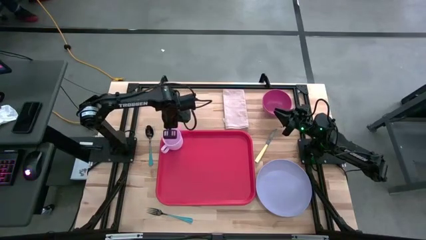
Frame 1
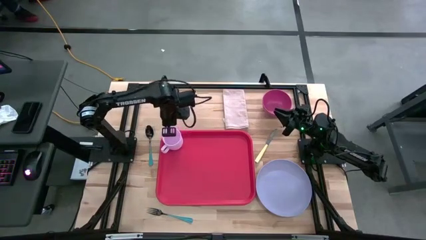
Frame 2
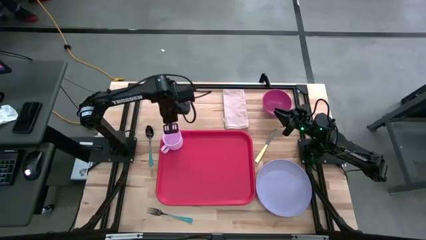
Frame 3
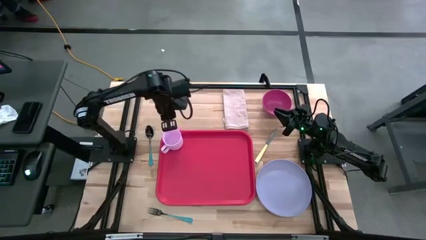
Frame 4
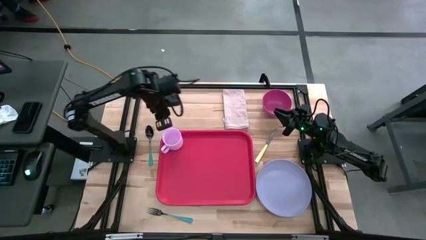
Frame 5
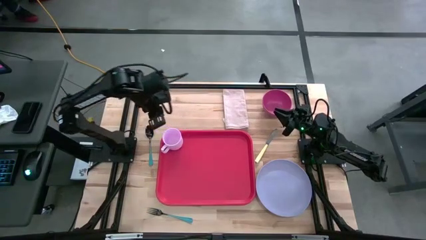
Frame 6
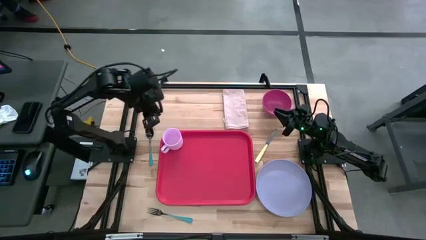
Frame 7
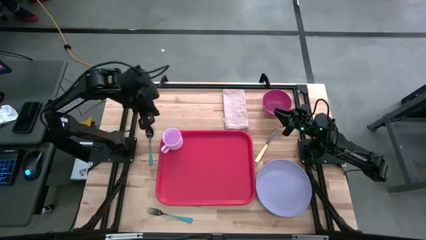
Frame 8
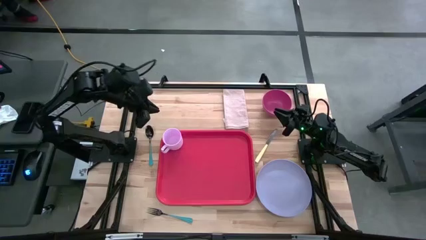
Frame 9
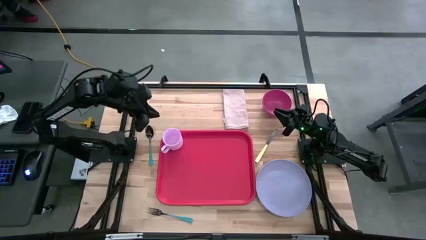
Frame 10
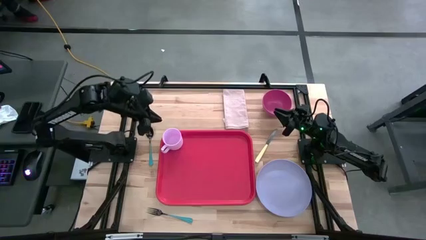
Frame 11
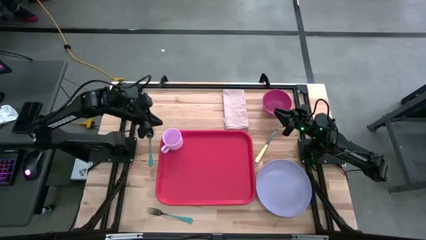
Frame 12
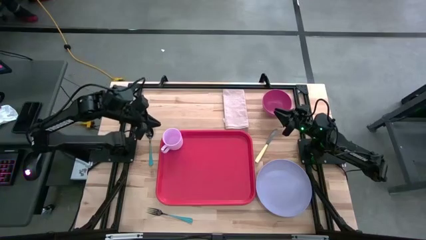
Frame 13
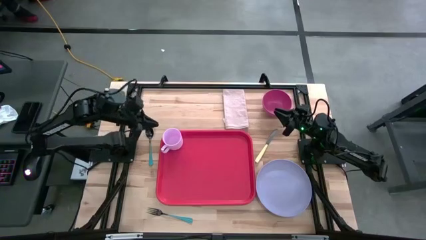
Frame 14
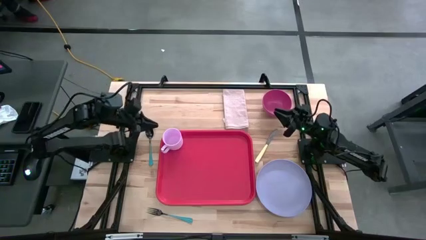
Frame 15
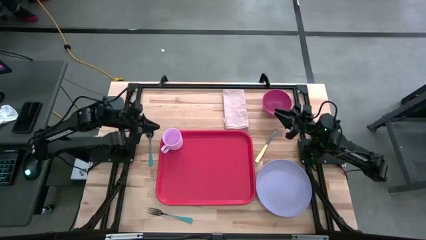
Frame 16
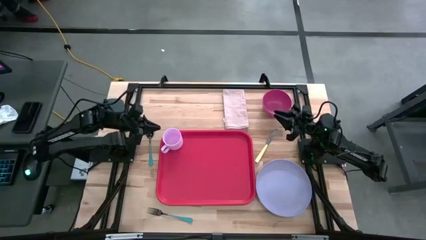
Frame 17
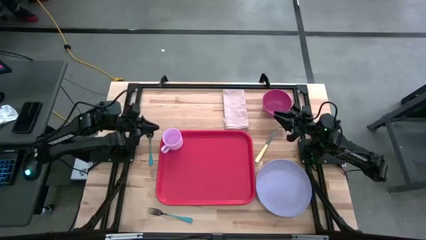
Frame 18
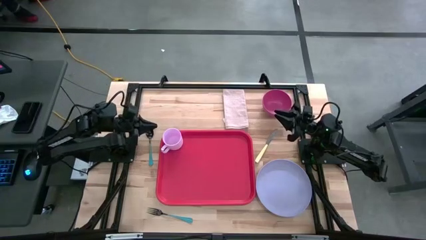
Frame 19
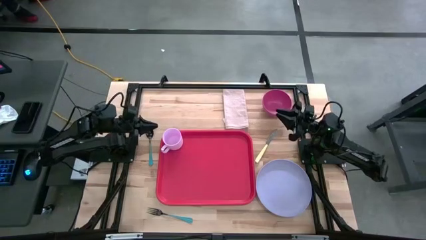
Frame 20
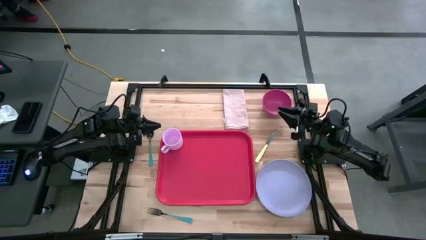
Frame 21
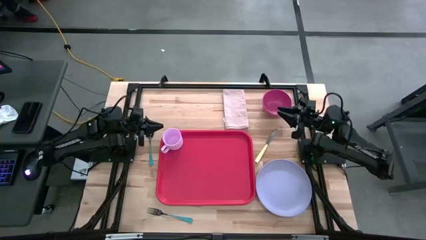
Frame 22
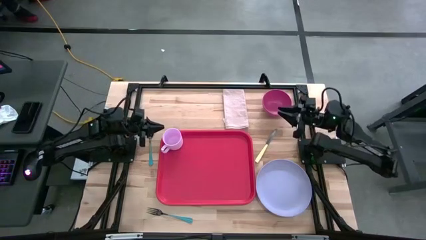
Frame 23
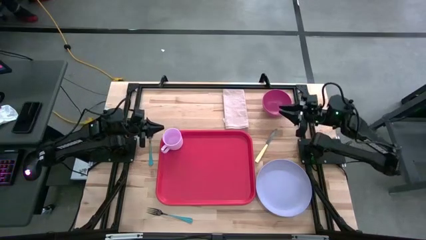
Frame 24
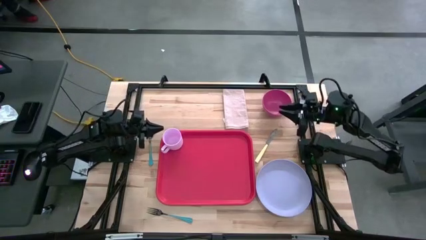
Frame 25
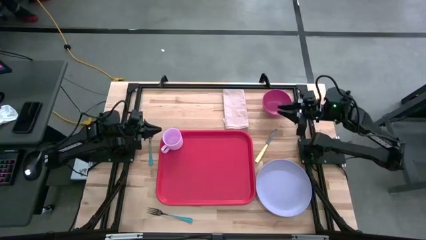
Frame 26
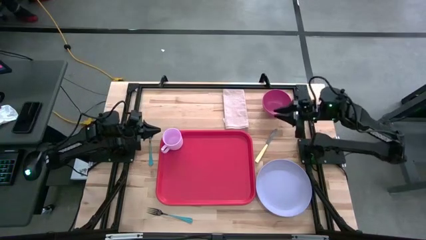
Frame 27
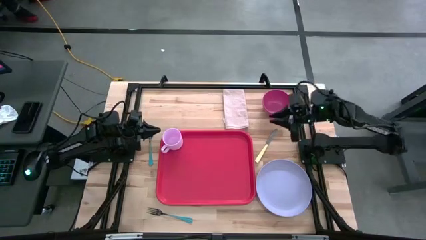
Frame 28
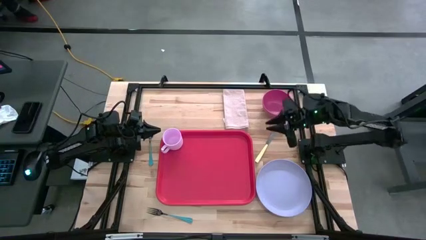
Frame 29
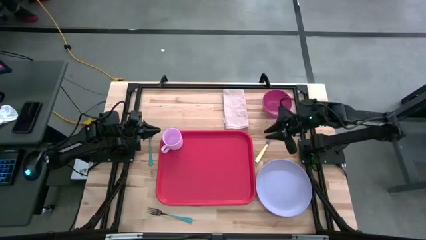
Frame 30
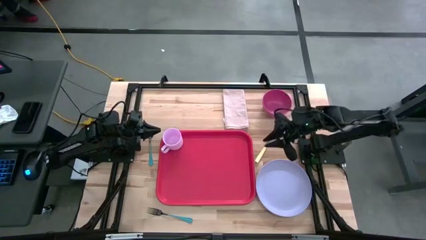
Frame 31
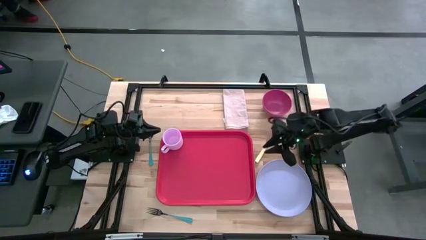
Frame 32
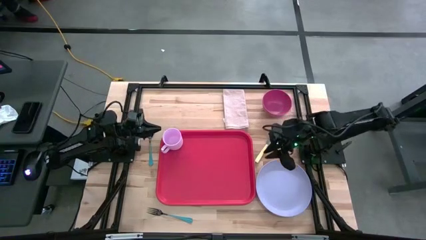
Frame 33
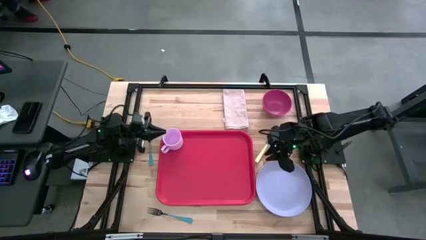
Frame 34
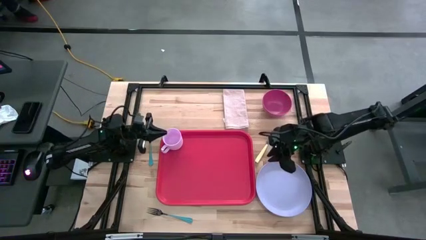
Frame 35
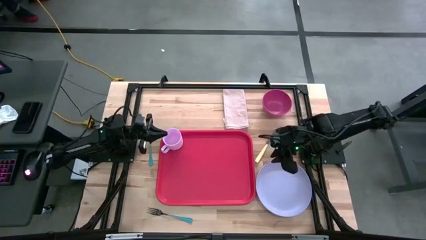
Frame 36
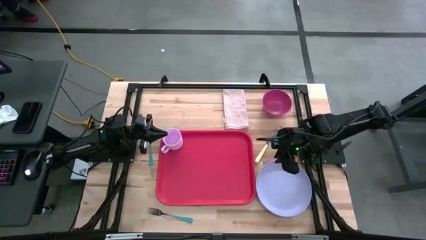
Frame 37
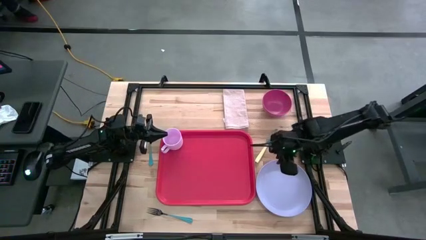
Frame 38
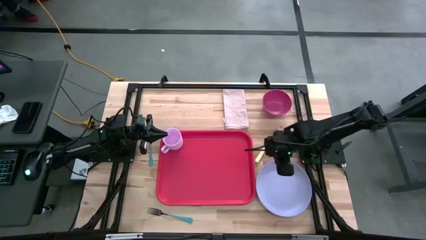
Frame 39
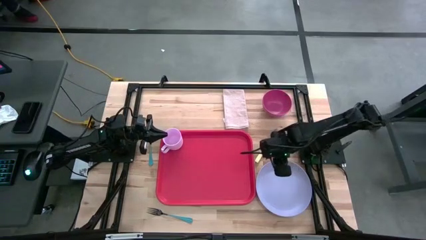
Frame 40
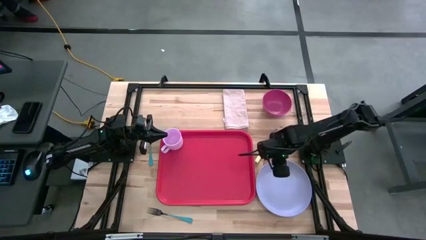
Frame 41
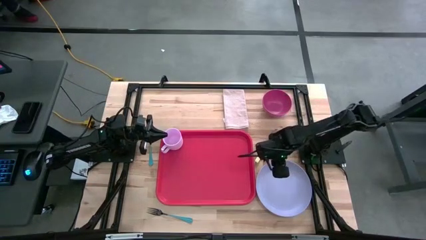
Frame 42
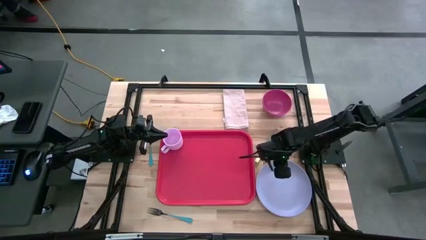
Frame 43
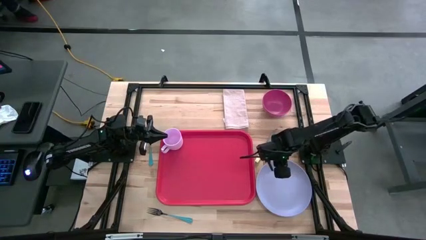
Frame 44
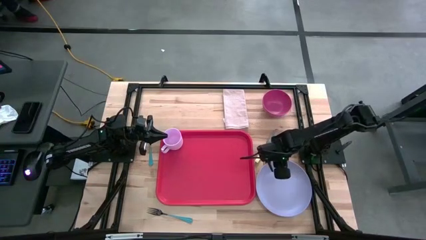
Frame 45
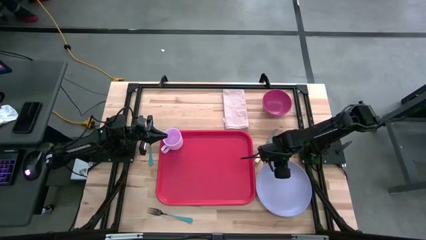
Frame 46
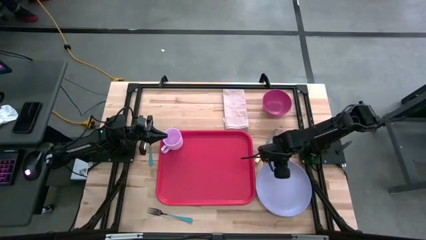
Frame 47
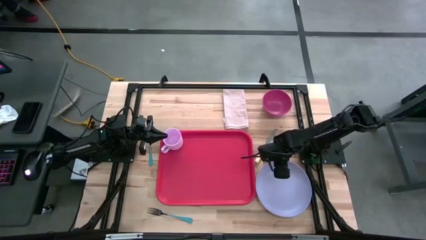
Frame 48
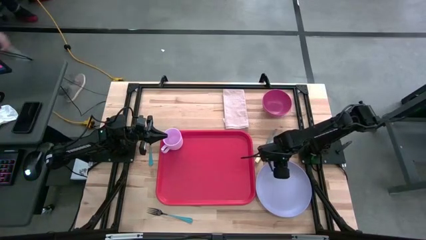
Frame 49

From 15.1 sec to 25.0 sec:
Task: Set up tray
Put the blue plate on the red serving tray to the bottom right of the purple mug

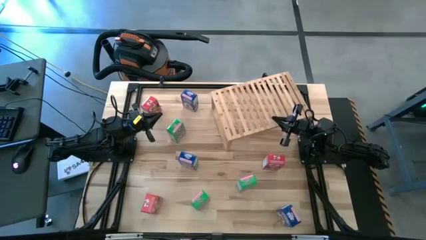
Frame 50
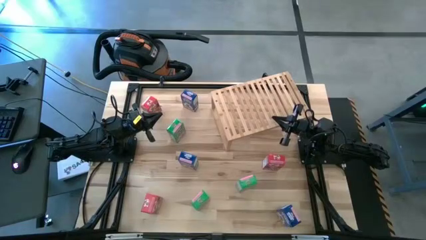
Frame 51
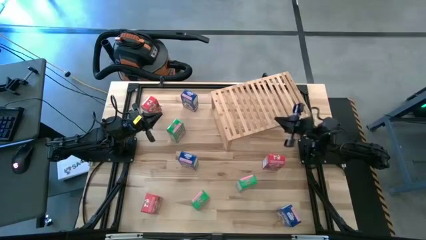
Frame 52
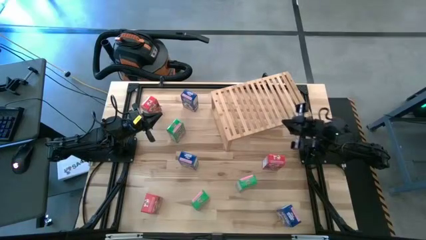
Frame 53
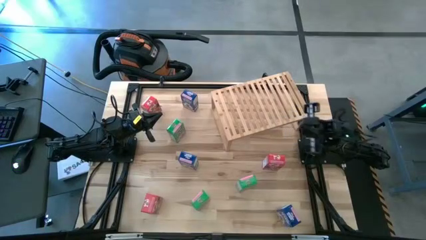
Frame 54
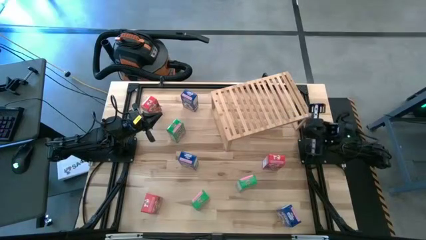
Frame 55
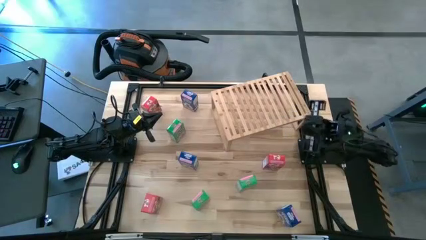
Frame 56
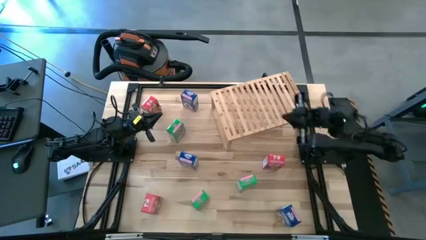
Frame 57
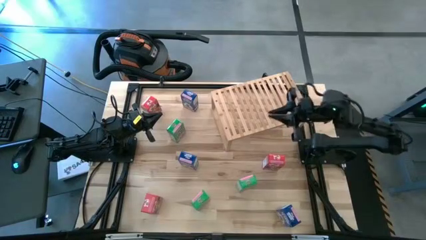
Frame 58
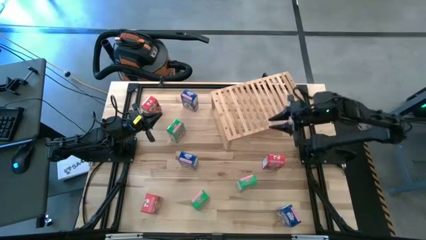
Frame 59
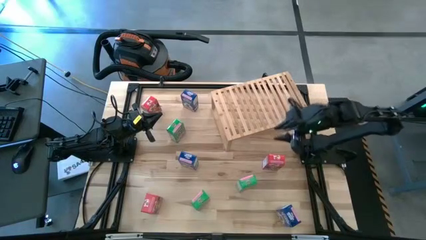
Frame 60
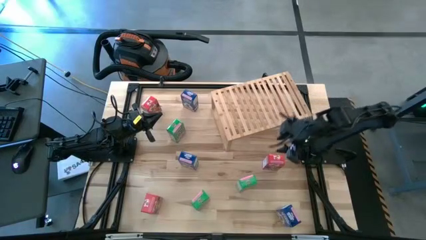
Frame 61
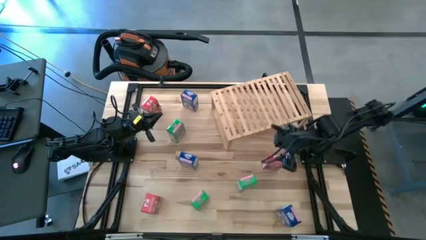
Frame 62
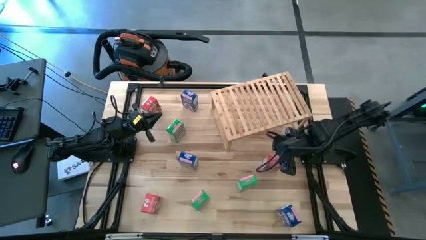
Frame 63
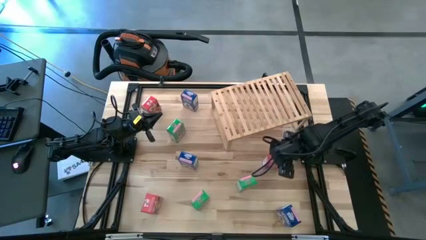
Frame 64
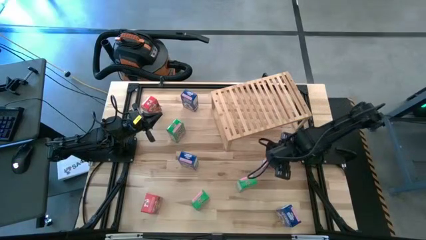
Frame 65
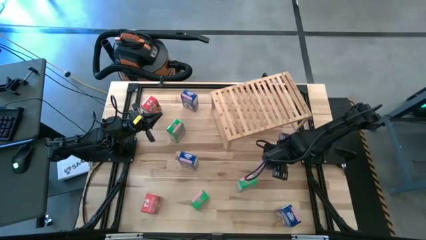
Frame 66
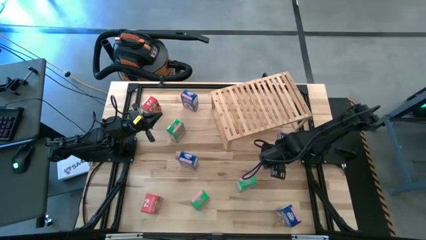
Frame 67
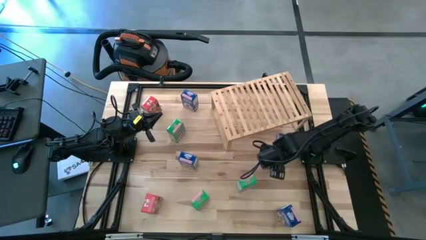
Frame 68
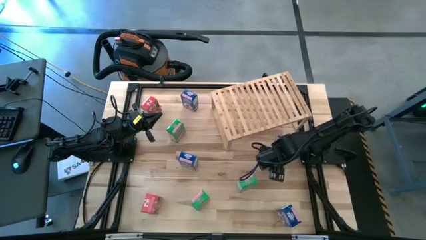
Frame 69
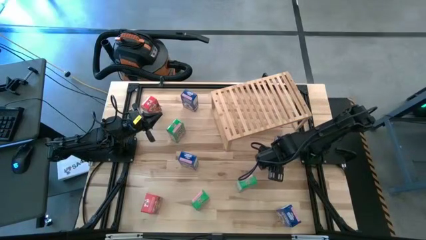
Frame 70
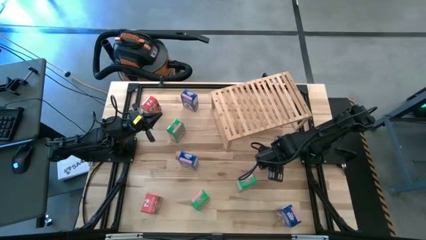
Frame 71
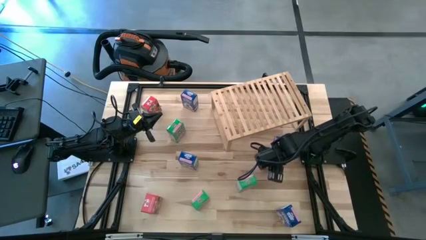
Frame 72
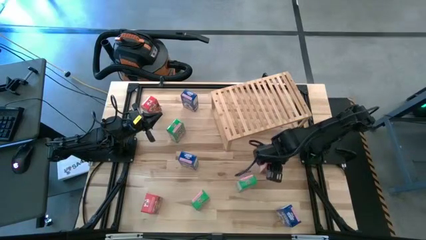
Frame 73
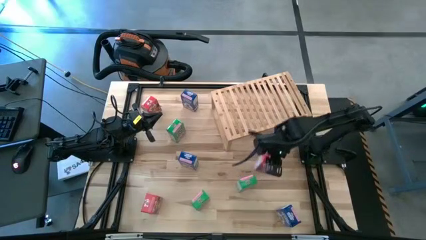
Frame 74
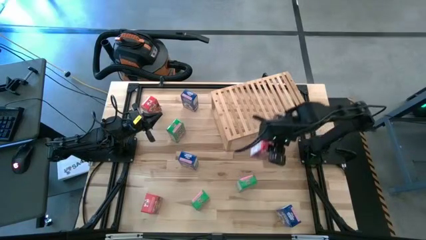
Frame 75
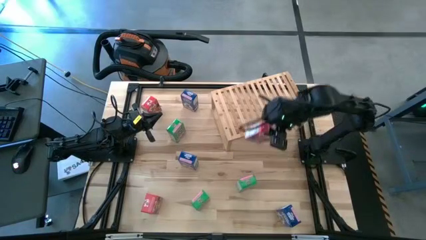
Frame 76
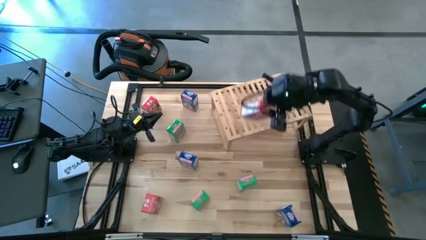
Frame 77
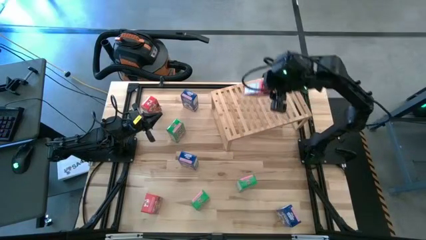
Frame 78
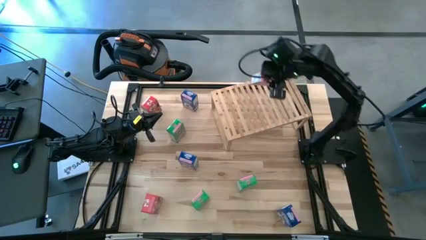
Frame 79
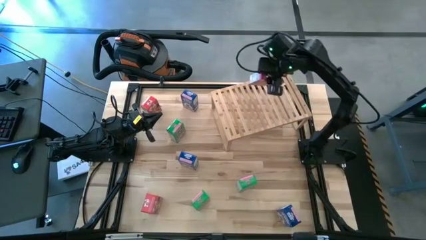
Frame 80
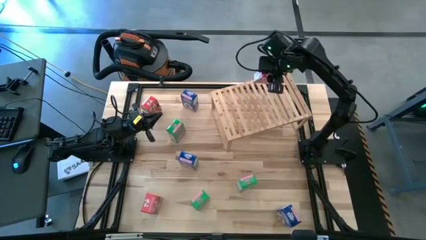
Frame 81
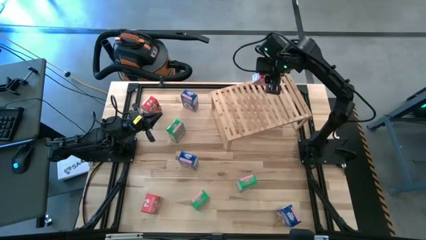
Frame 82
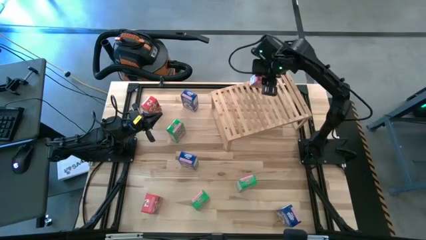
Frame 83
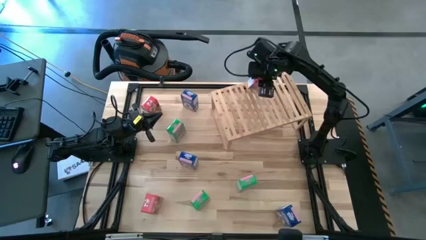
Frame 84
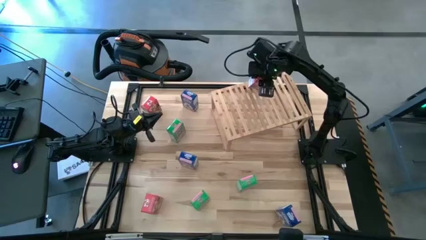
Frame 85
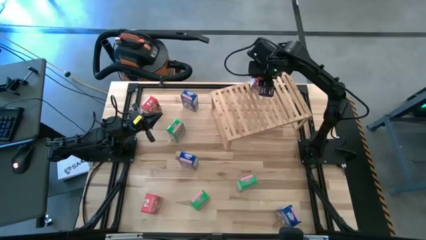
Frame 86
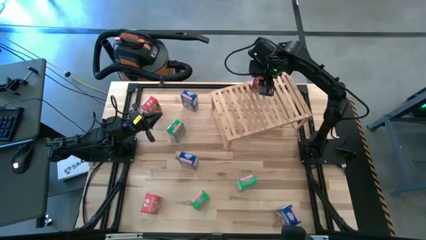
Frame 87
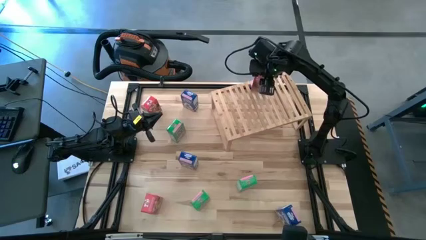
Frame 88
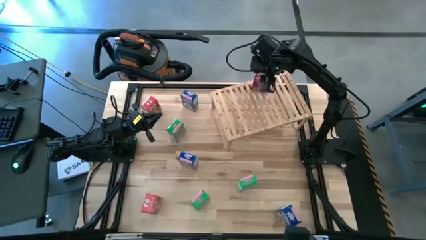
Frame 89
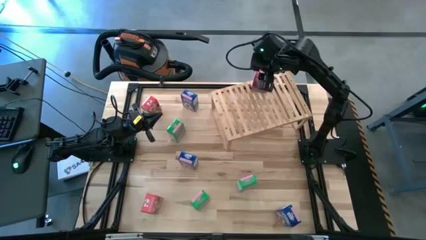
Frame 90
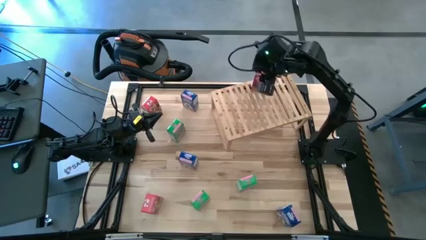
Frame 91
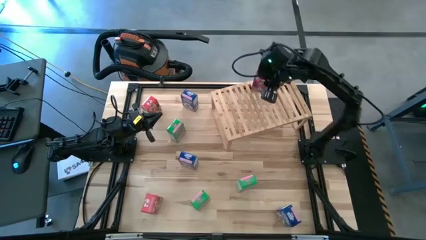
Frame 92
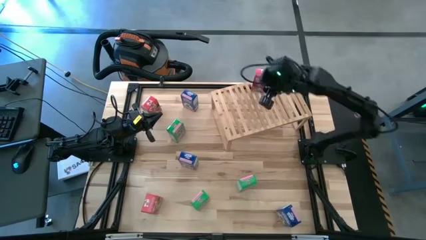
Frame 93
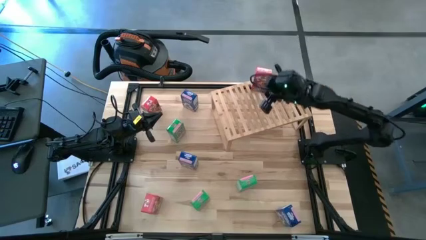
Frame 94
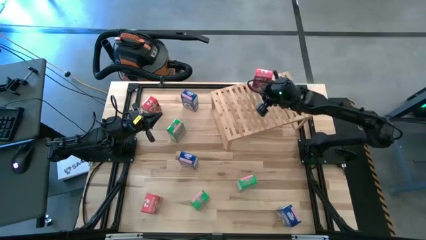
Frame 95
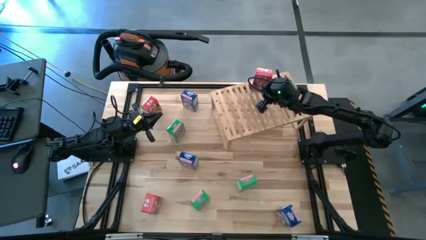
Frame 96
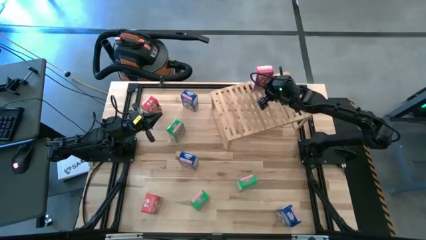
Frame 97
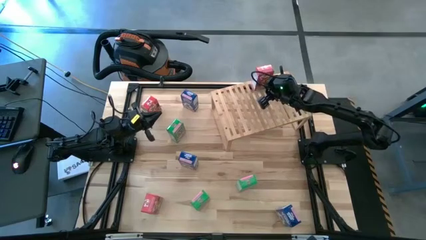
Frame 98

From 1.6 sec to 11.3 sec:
Task: Stack cereal on shelf
Put the middle right red cereal box on the shelf
